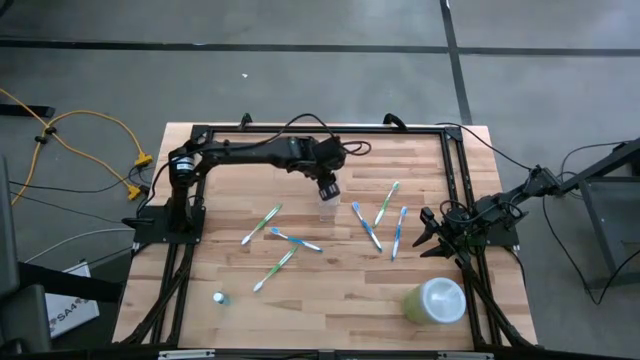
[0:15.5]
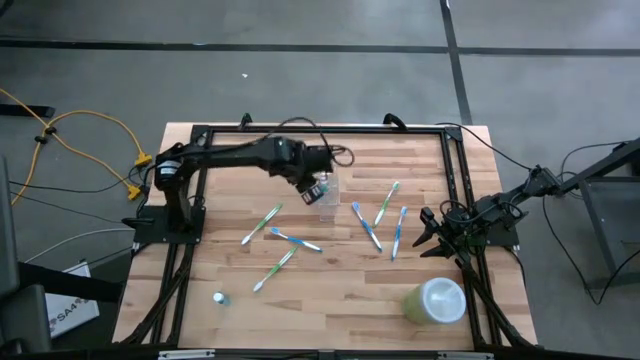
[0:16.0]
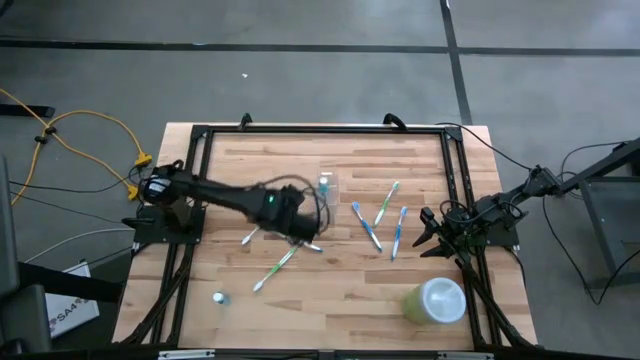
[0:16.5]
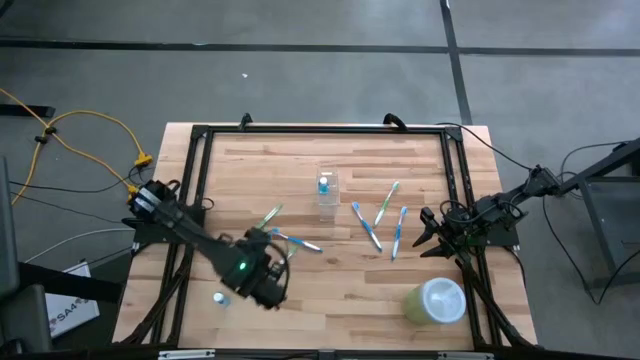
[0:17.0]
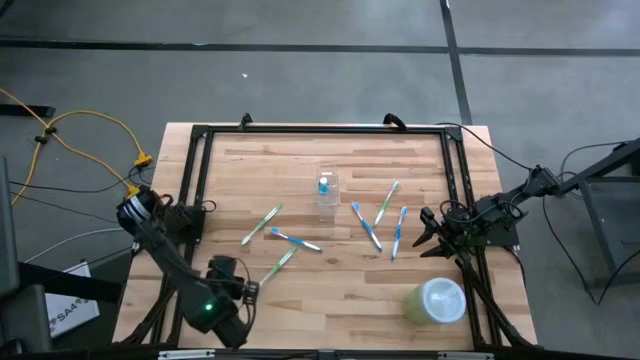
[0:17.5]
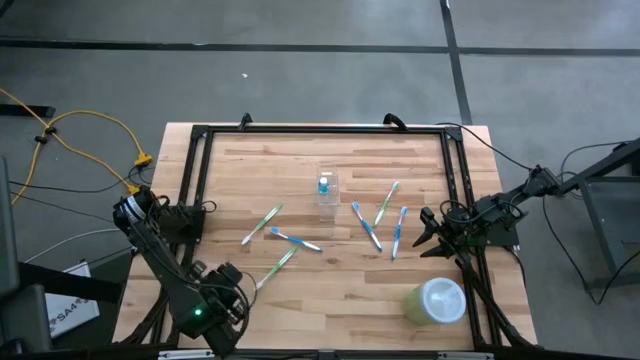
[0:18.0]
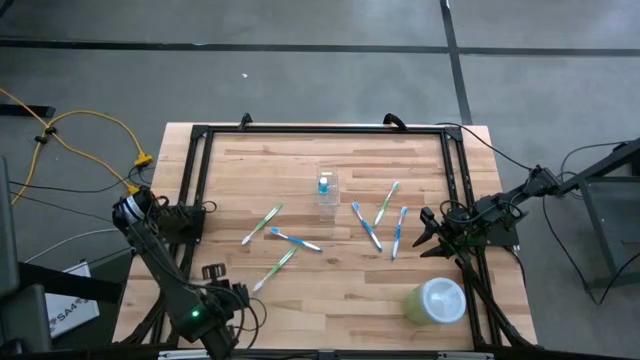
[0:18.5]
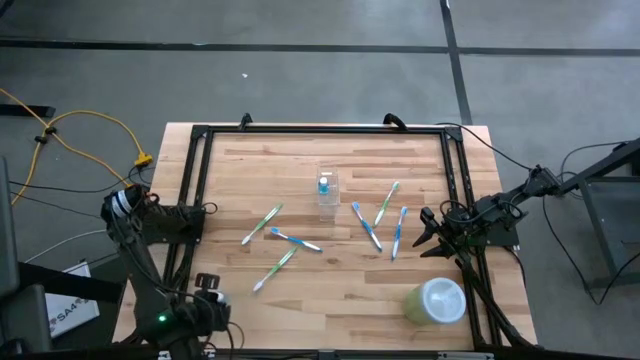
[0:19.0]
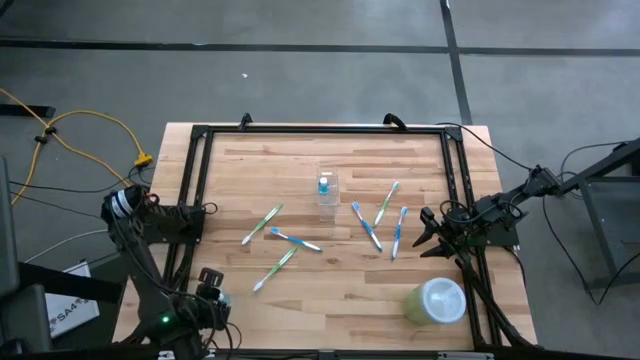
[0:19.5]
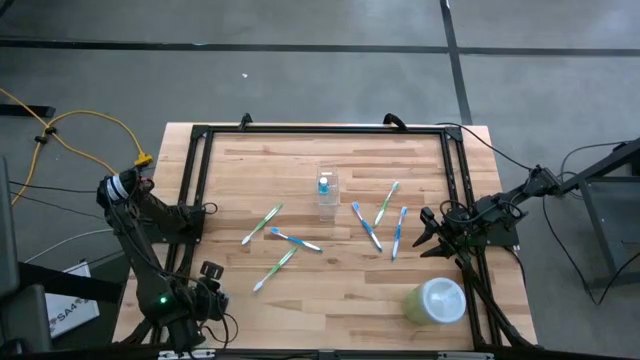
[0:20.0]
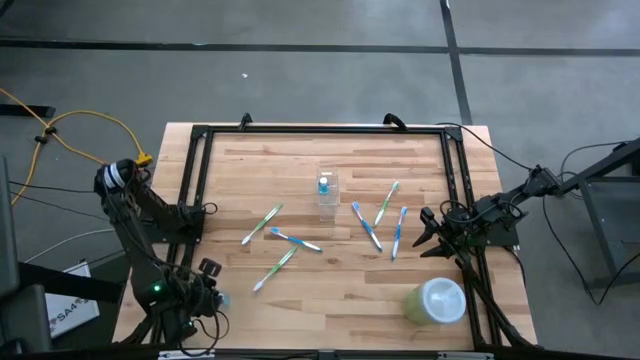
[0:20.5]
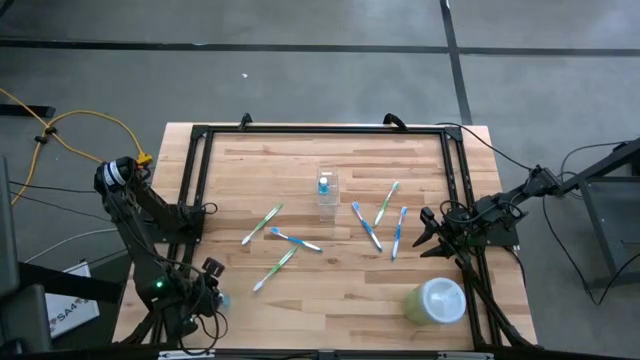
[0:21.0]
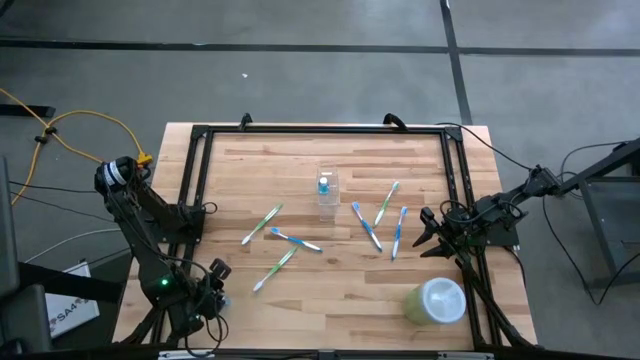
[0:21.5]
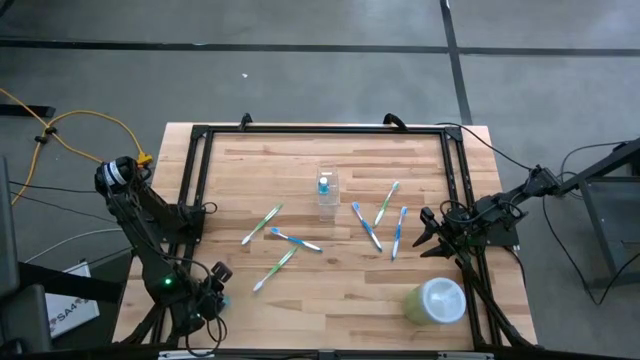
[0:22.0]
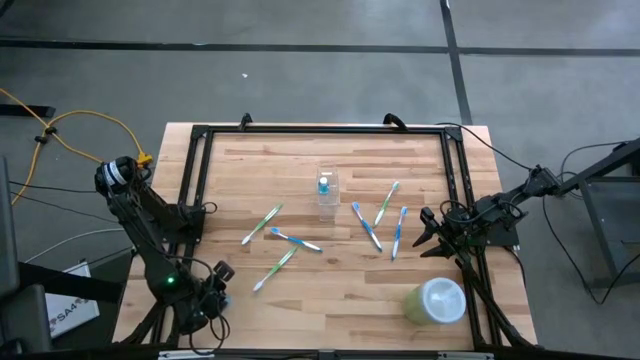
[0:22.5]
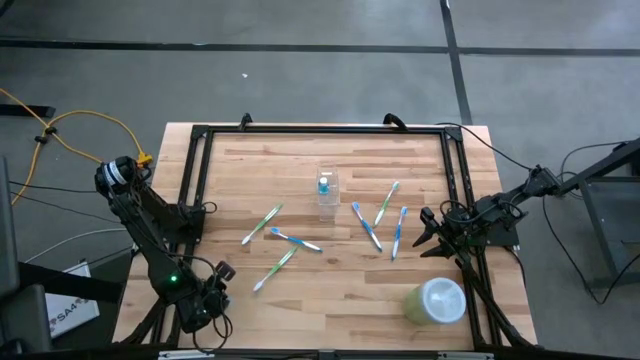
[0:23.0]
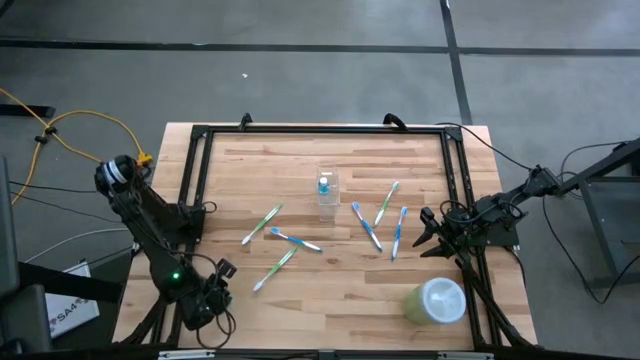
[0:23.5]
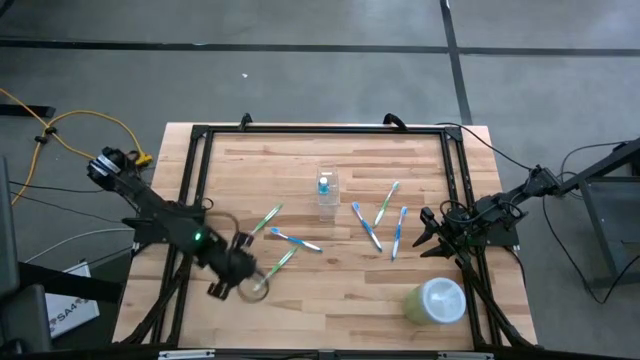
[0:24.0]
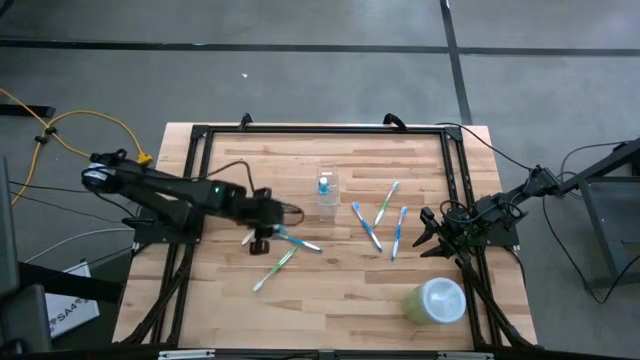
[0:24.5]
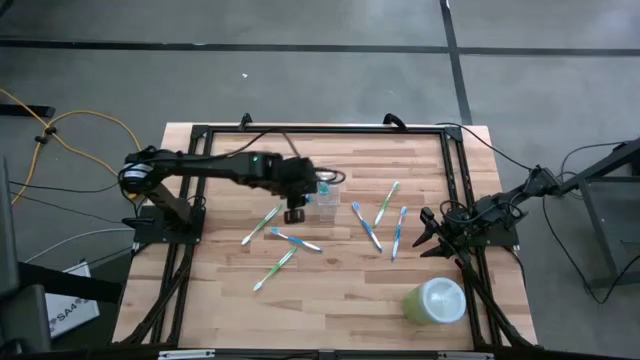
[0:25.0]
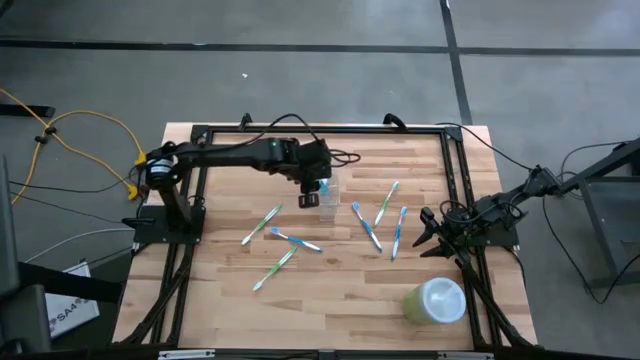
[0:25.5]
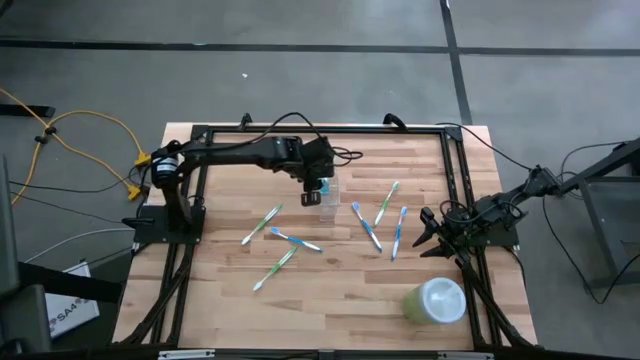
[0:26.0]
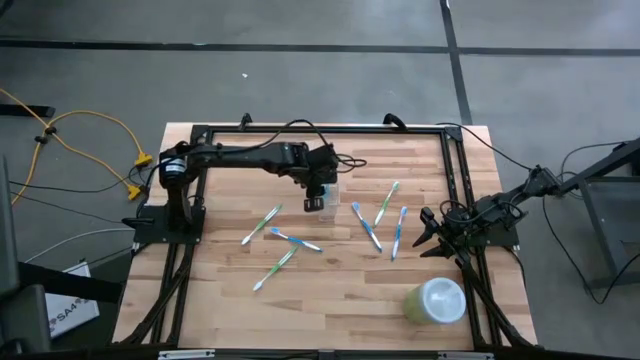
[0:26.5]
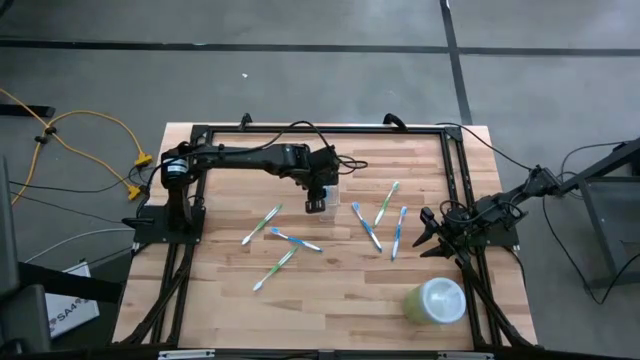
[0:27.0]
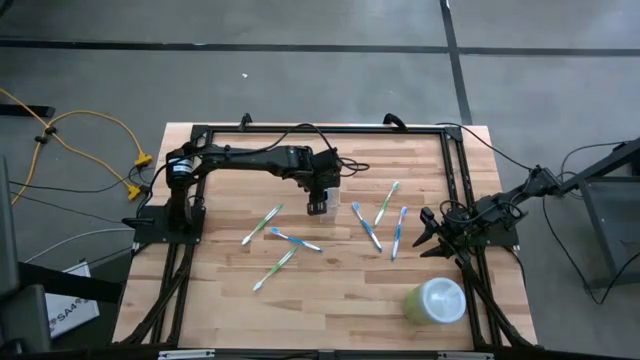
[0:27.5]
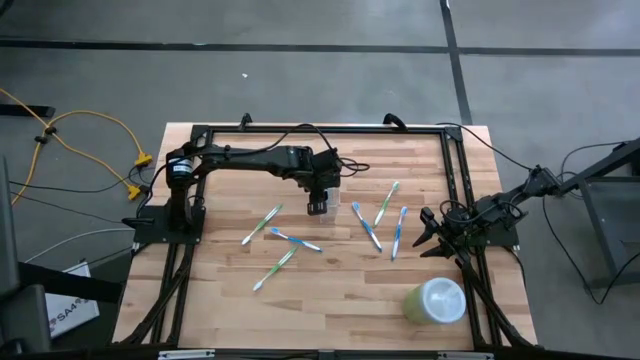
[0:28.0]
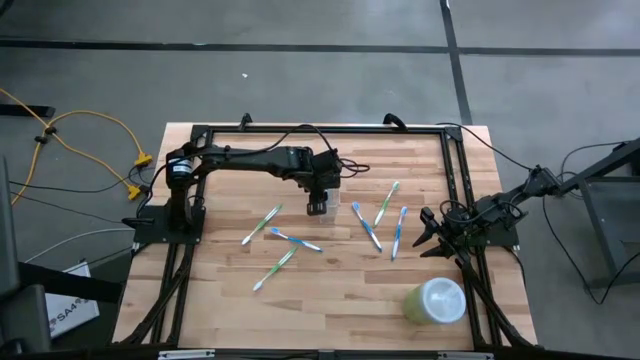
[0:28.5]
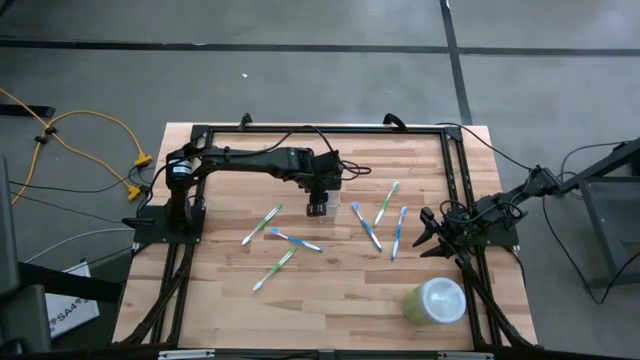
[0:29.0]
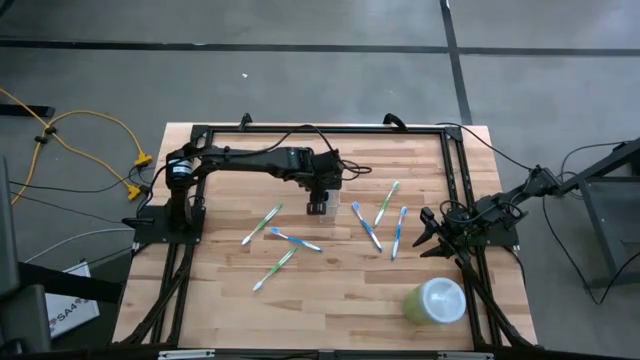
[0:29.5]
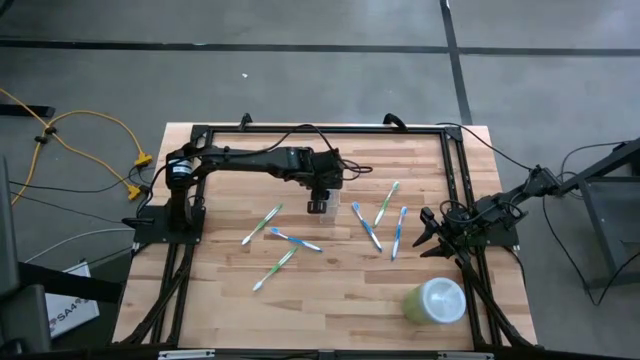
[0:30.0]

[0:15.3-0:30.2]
Task: Pick & Place toothbrushing station
Put the blue mouthwash into the transparent organizer

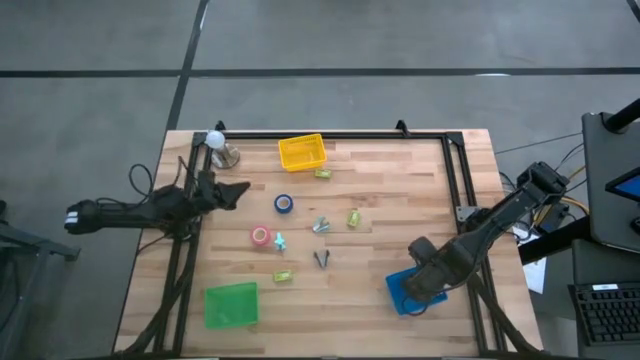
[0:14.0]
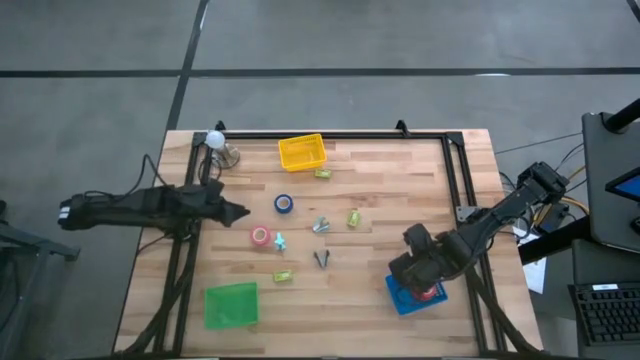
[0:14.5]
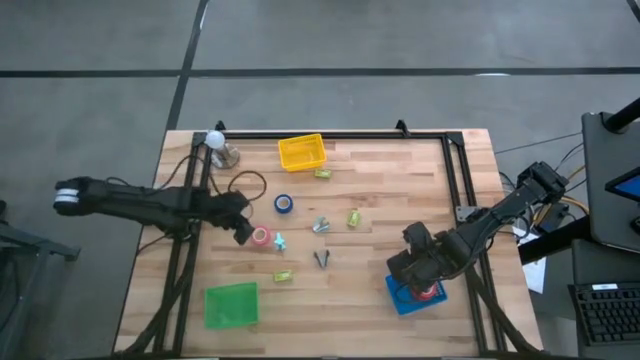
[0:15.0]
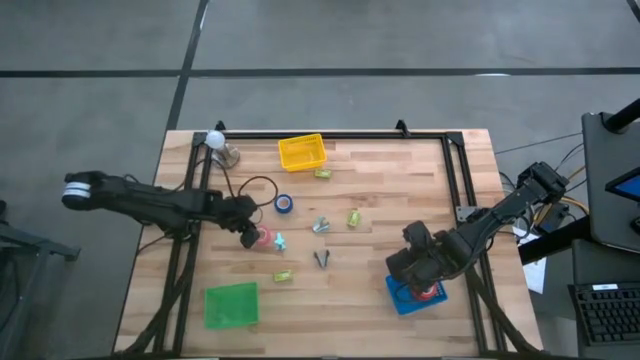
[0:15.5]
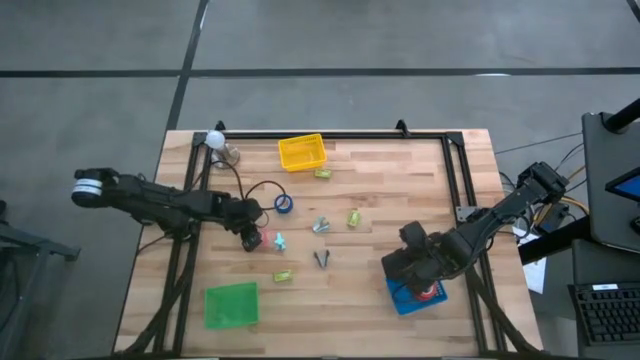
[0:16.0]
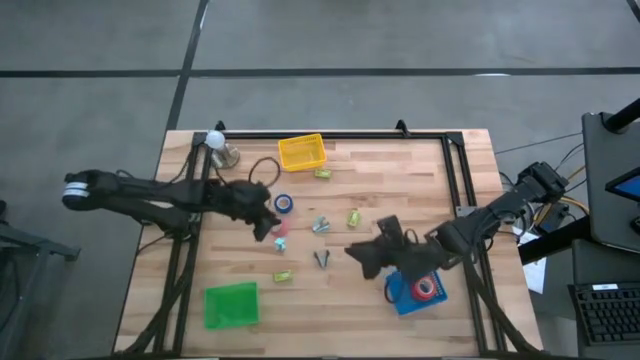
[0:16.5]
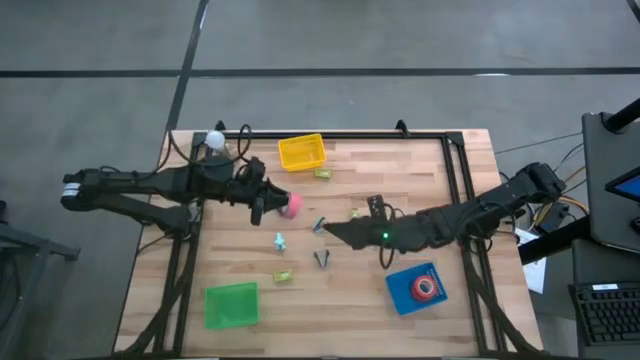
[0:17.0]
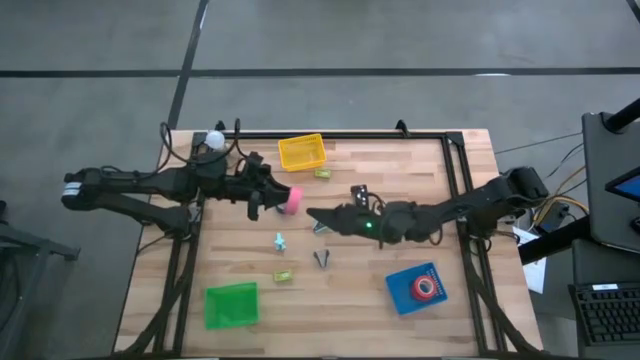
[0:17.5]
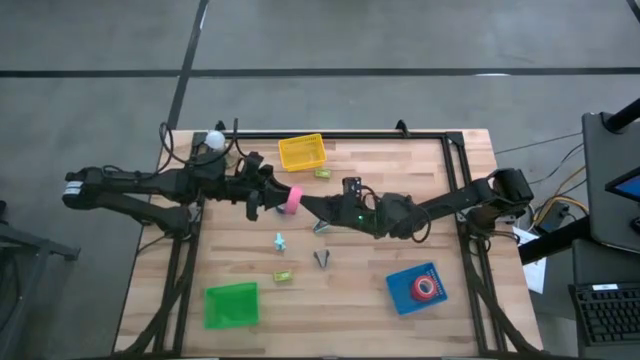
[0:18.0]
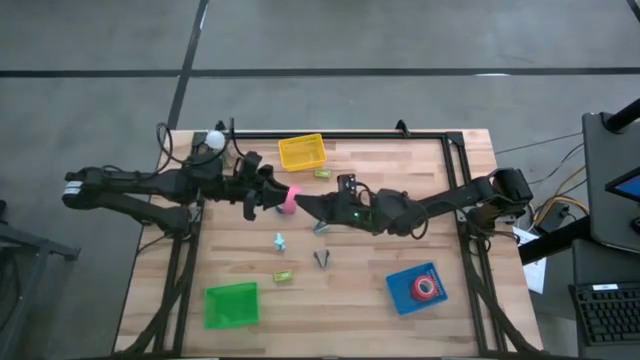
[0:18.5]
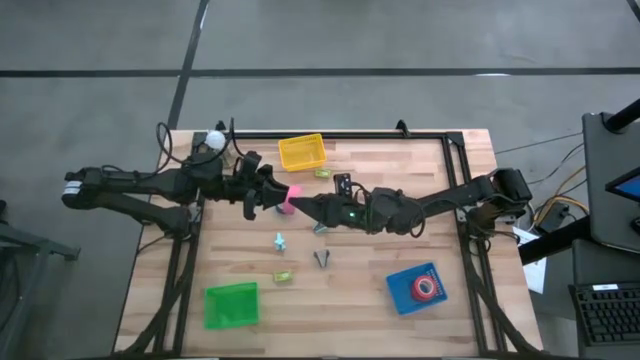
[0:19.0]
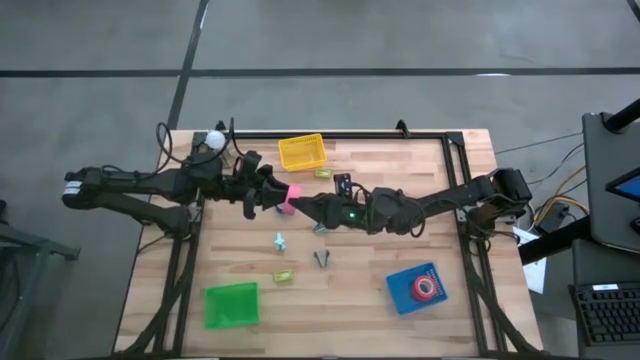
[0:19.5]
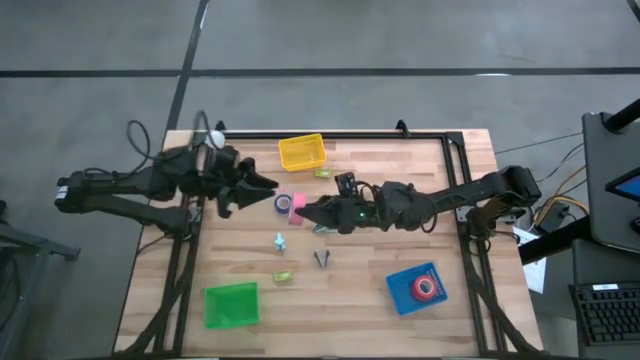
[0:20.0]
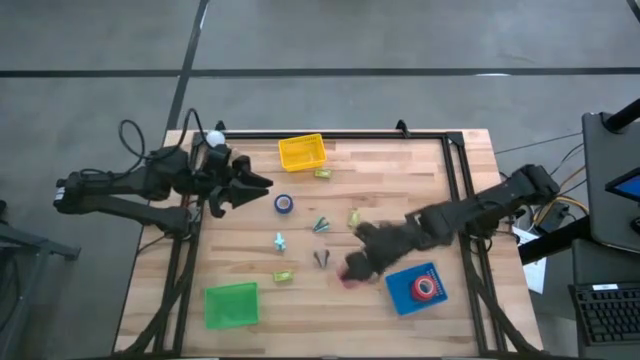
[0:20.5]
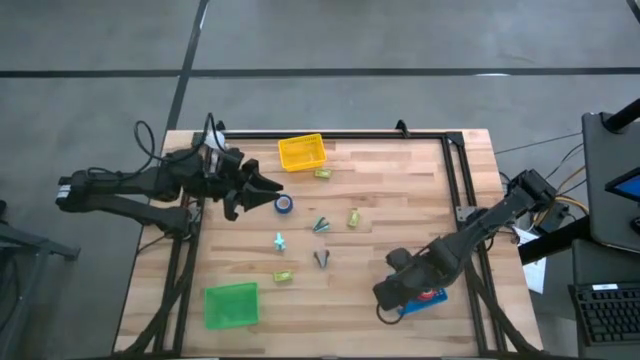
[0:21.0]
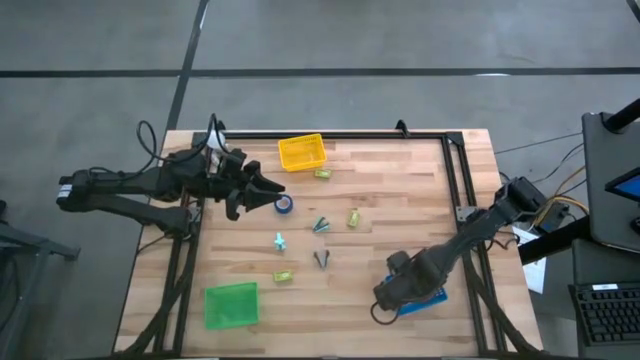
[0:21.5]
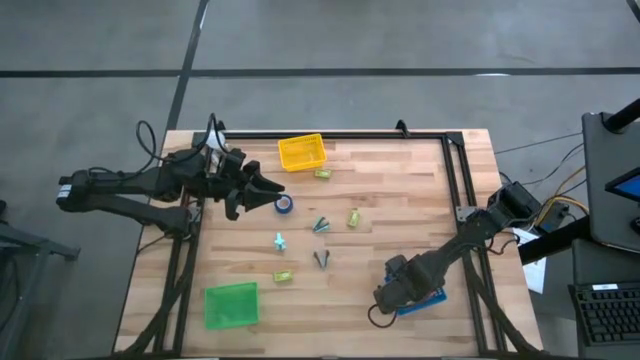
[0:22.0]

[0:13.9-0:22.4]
Task: Pick and place Stapler, Stapler remover, tape
Put the pink tape into the blue basket
